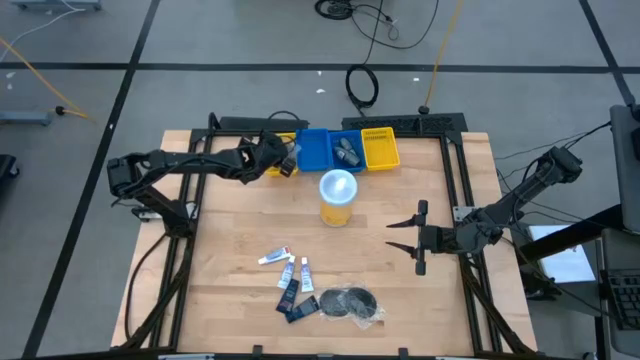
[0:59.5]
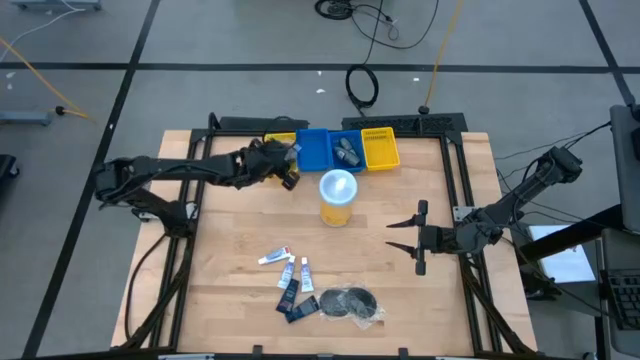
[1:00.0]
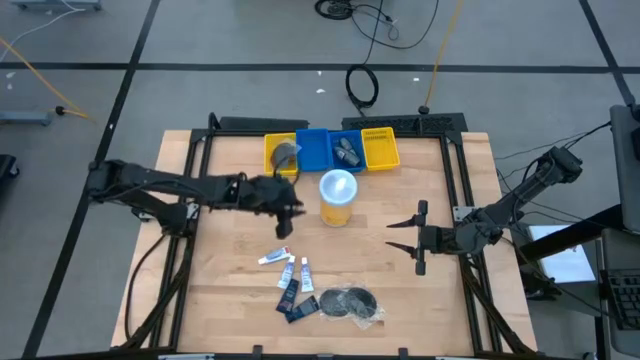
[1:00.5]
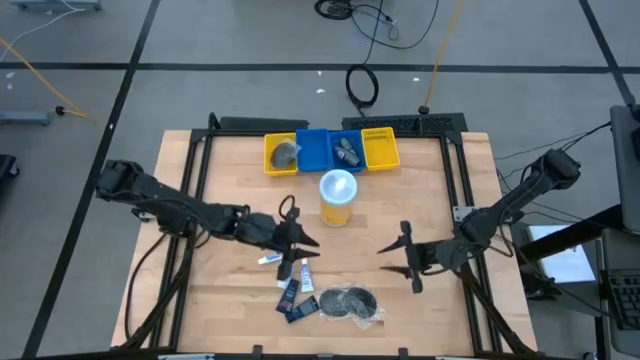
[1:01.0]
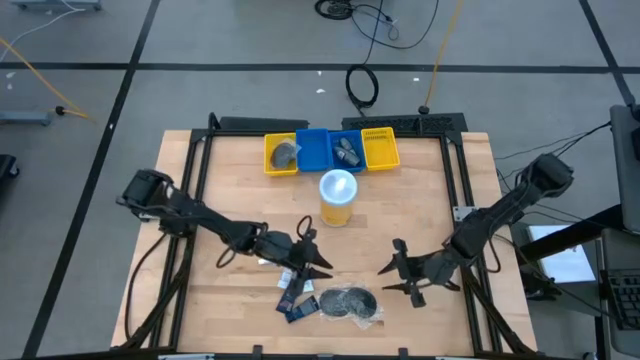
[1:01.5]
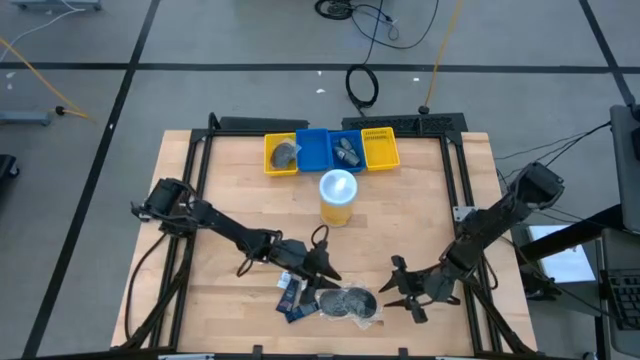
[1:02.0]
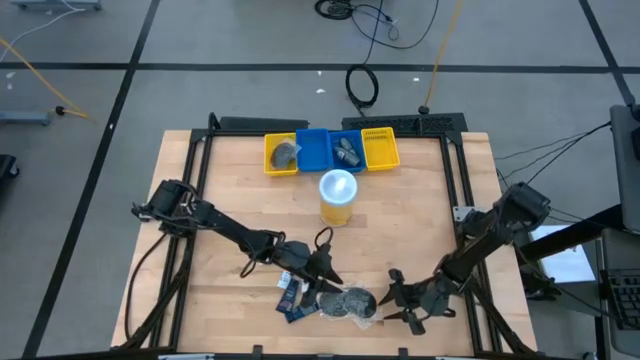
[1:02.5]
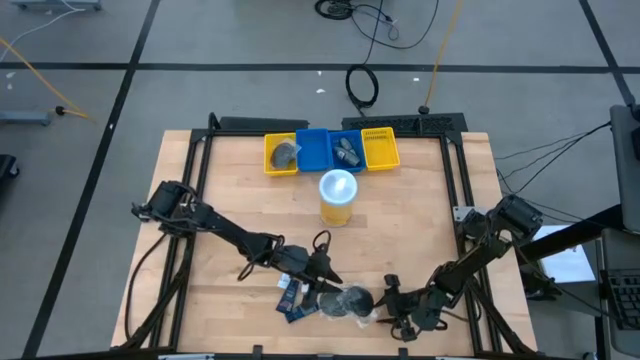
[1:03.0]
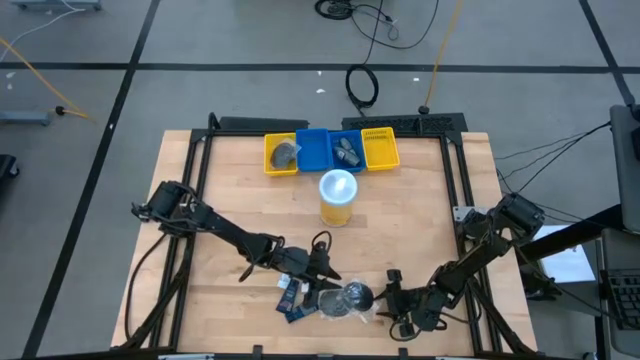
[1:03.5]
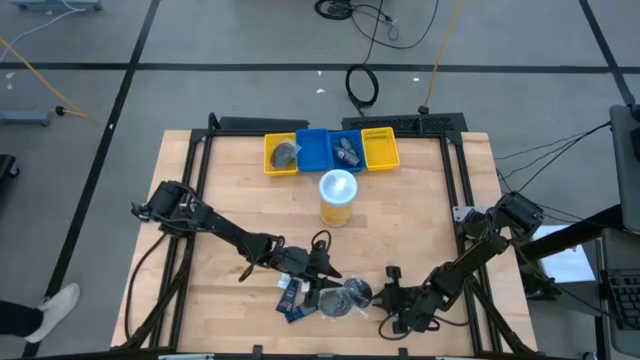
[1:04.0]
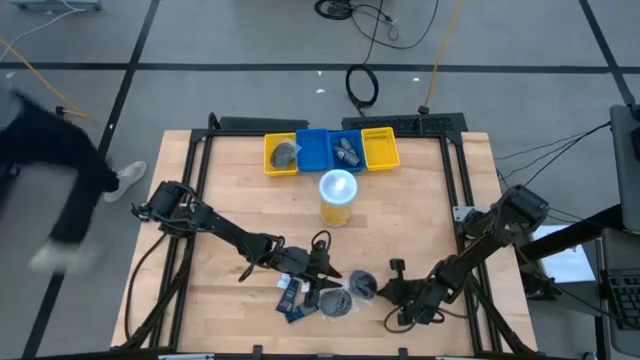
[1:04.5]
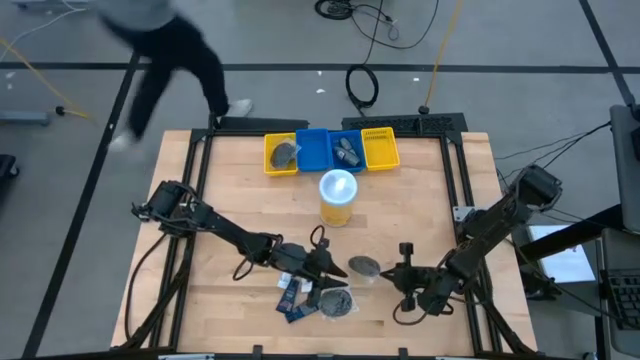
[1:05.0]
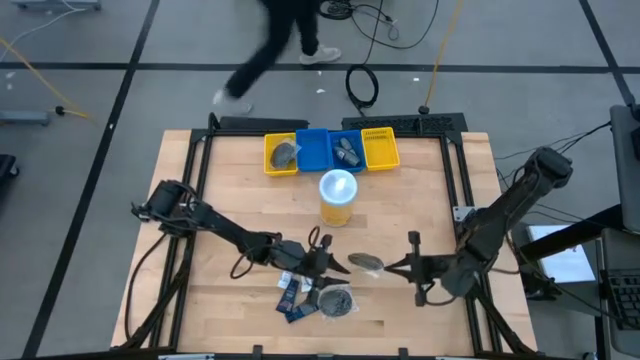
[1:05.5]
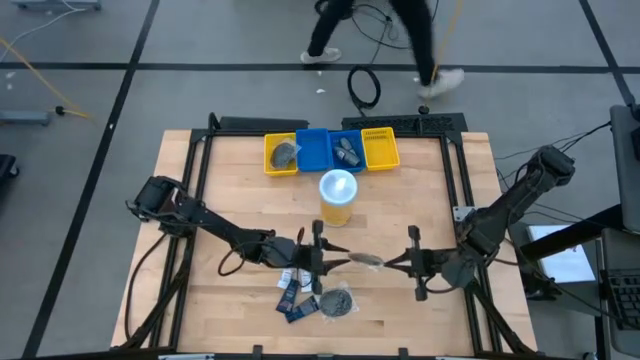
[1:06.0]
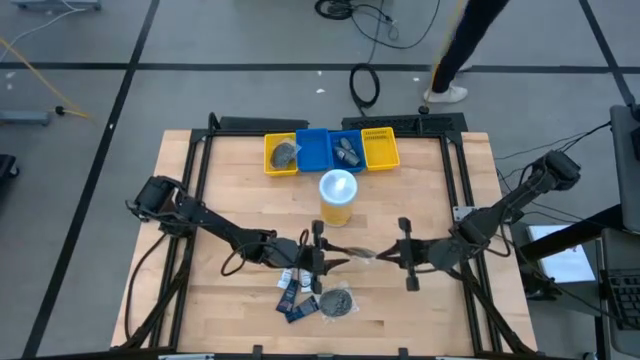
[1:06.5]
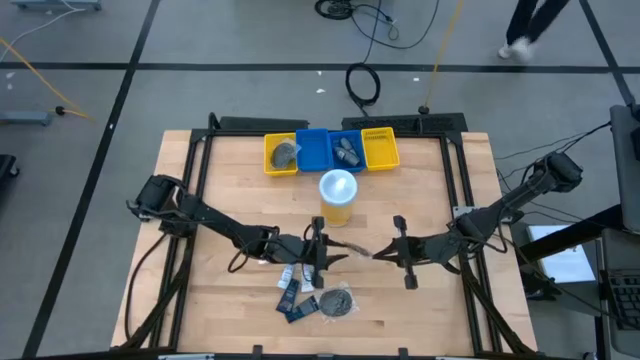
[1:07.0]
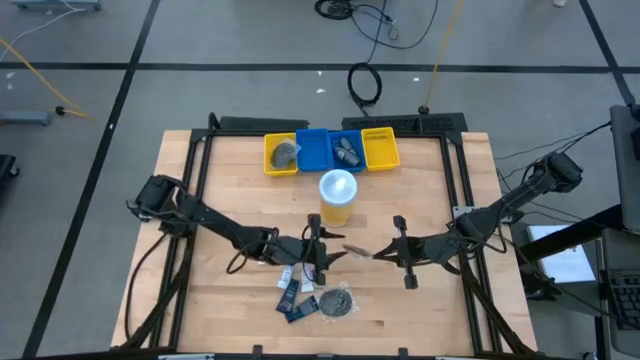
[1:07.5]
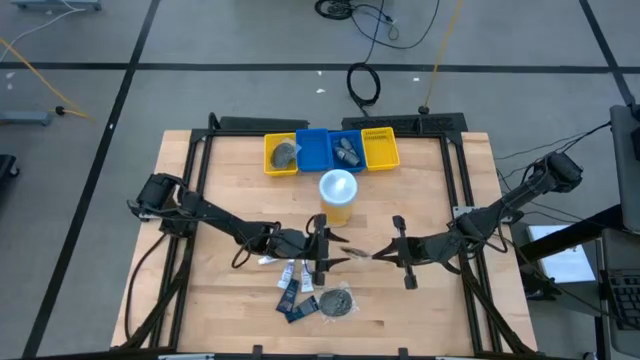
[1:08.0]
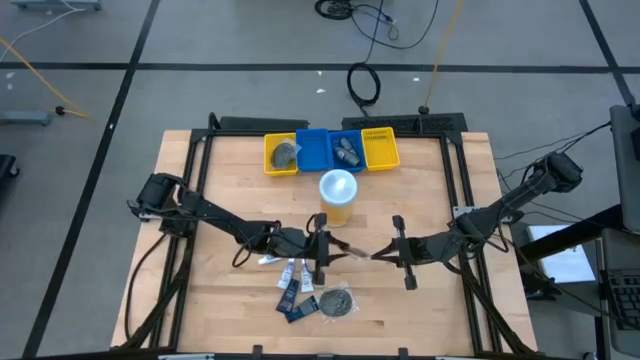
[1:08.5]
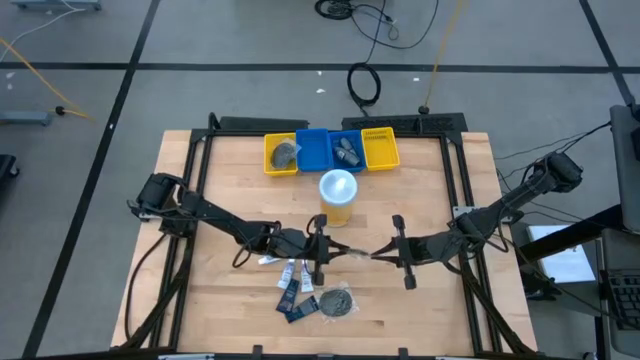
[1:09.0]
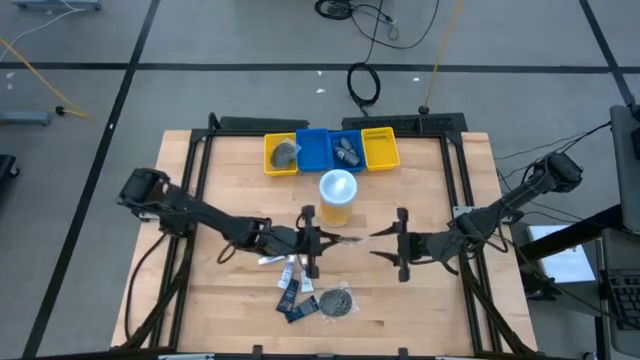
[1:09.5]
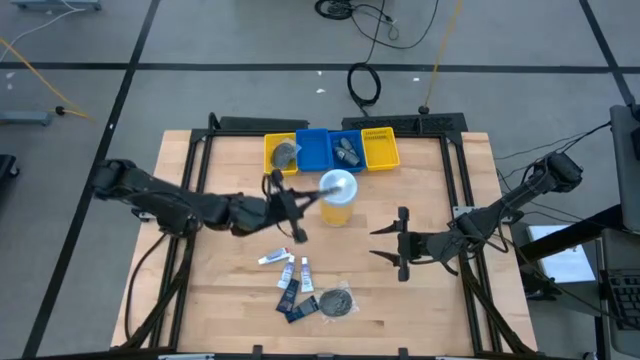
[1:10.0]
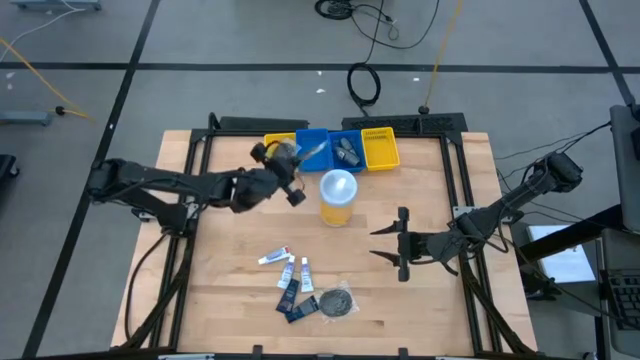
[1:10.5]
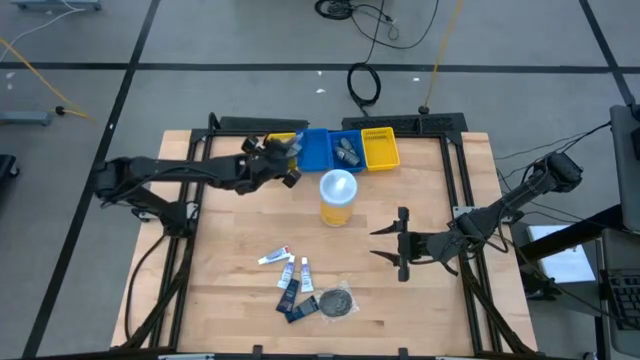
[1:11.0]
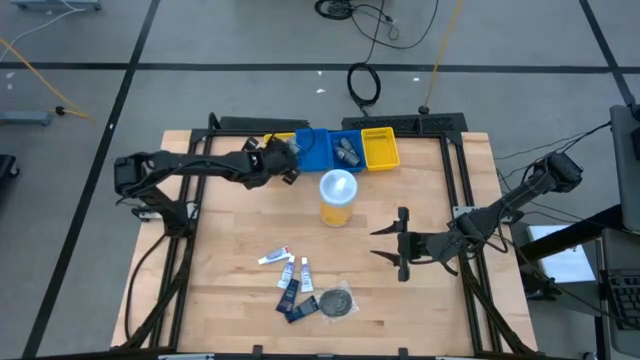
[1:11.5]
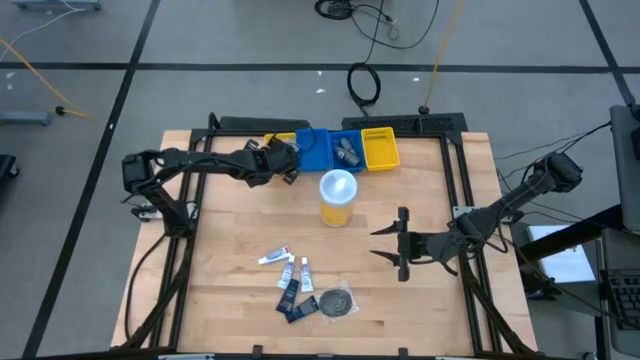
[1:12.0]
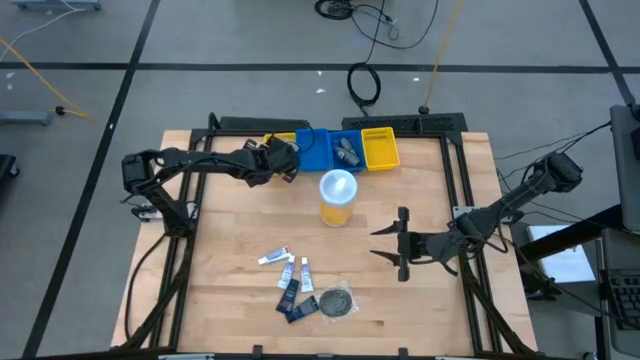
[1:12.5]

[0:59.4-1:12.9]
Task: Pick & Place Travel size toiletries
Put the hairbrush into the left yellow basket

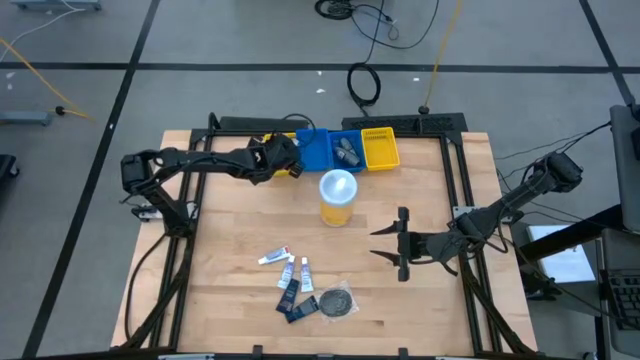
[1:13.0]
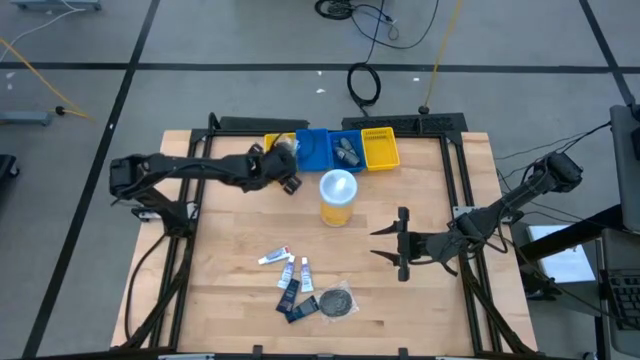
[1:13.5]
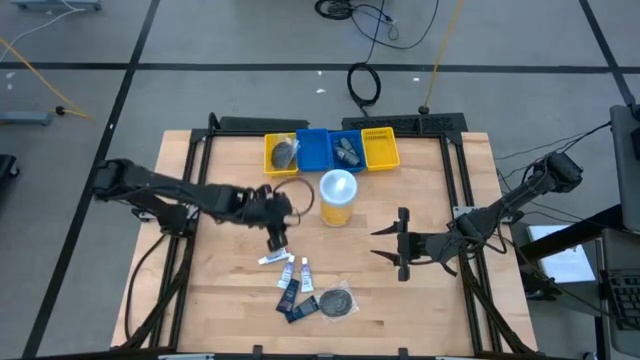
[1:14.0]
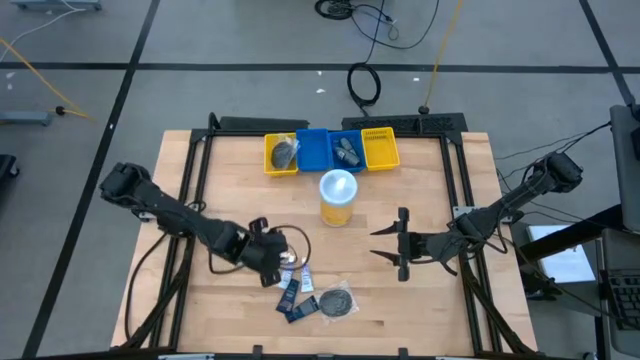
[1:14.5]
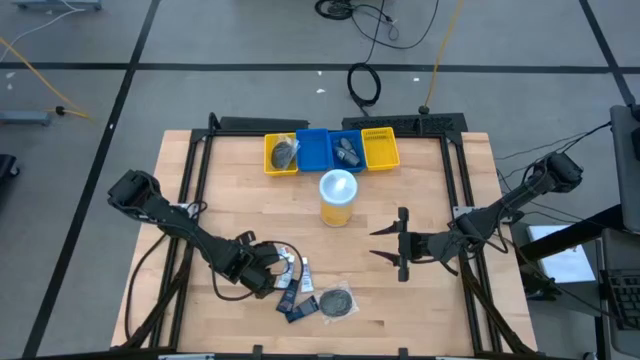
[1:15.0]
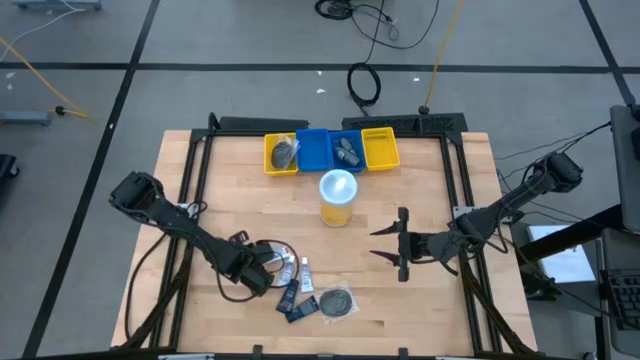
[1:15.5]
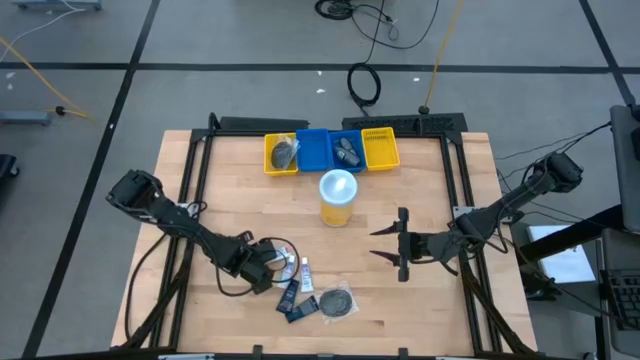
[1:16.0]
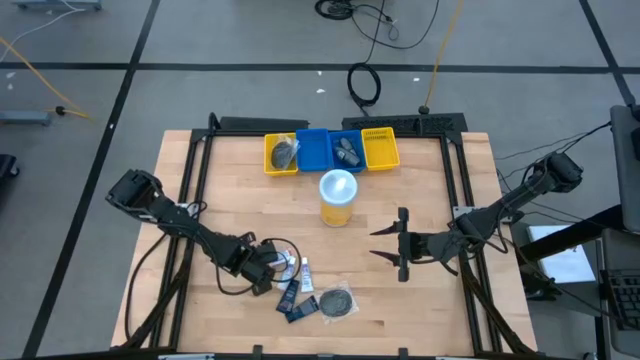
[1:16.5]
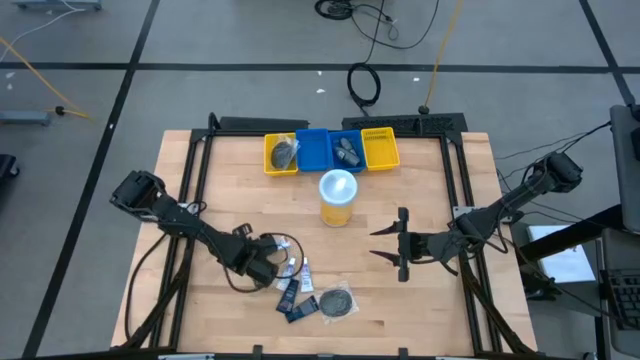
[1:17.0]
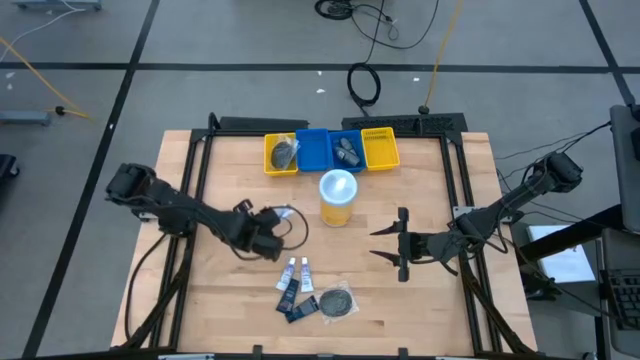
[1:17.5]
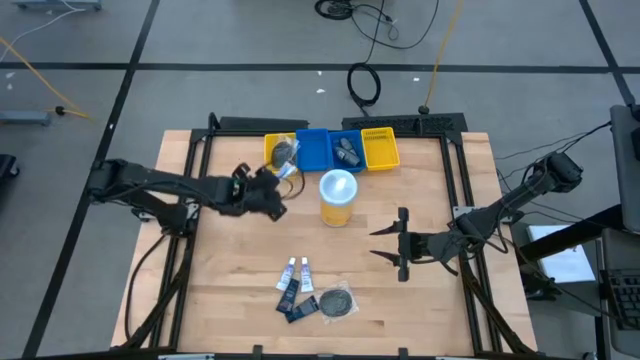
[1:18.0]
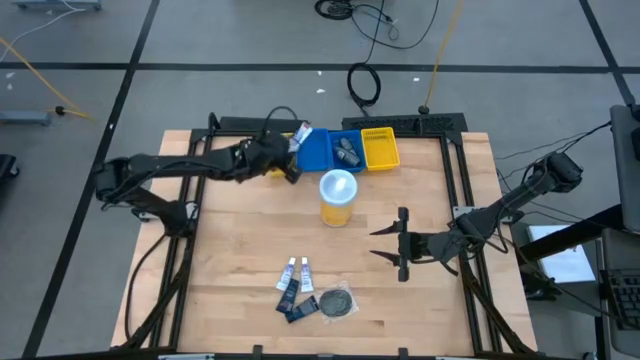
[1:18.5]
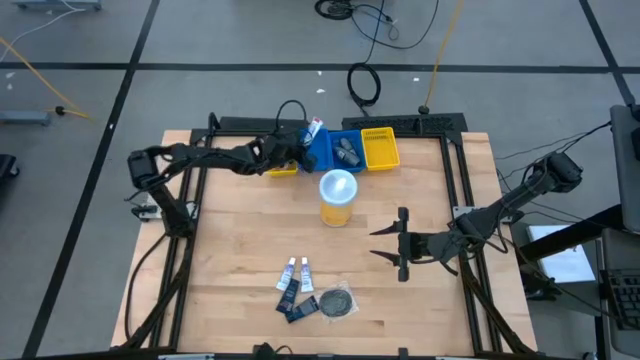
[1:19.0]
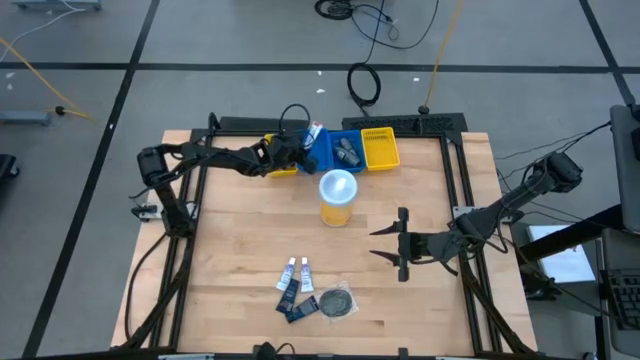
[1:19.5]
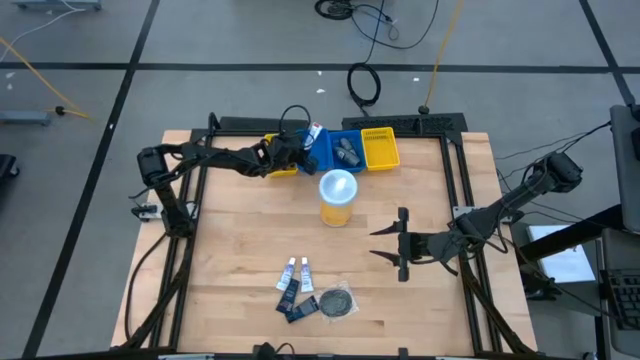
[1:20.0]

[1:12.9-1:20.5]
Put the toothpaste into the left blue basket

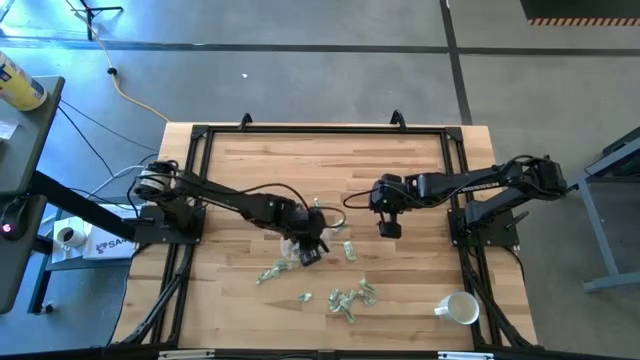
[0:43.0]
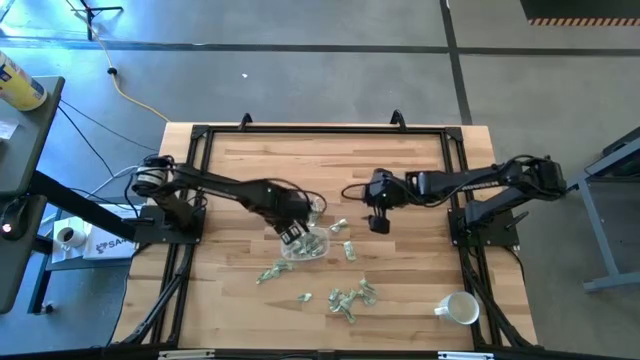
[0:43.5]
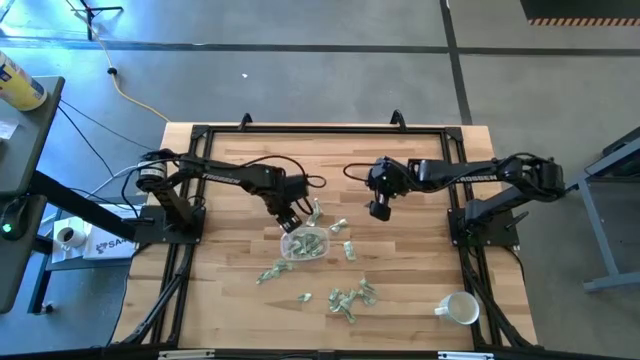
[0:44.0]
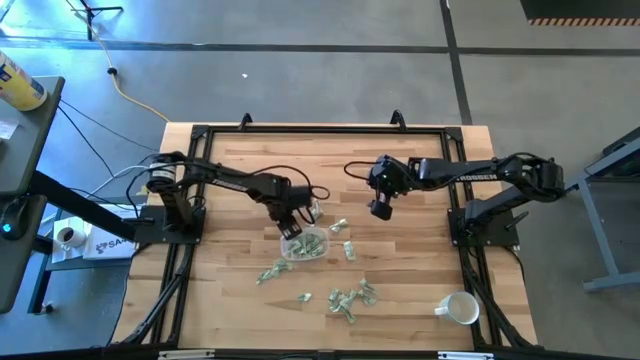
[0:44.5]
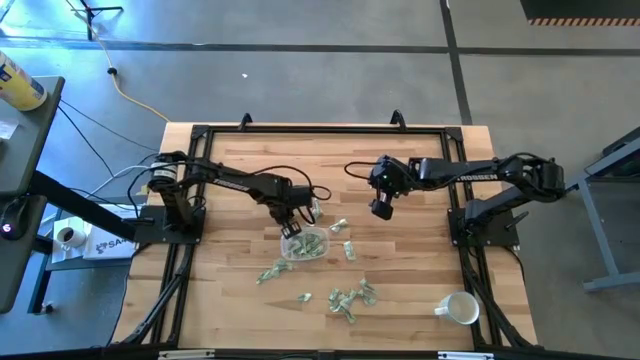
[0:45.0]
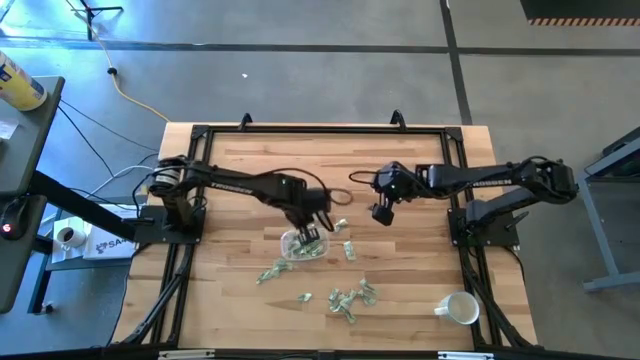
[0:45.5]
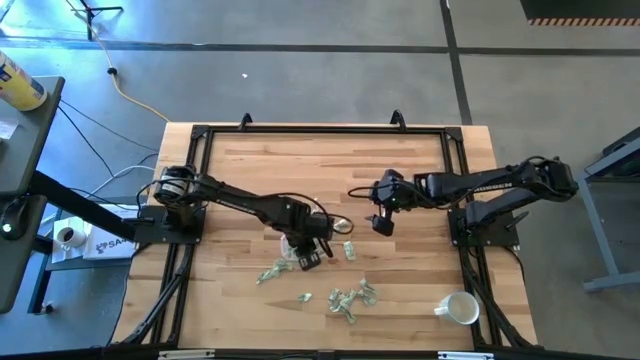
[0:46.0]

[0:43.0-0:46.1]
Task: Pick and place Stevia / Truvia into bins
Put the green stevia packet into the transparent bin
